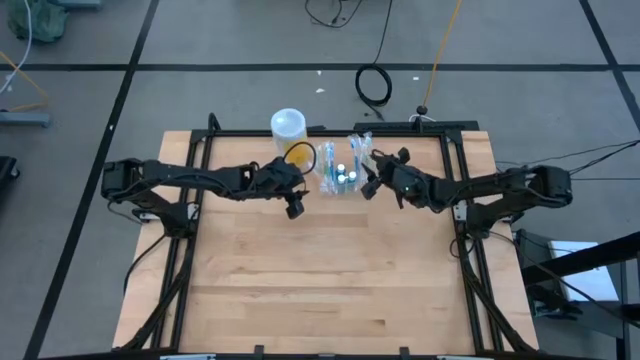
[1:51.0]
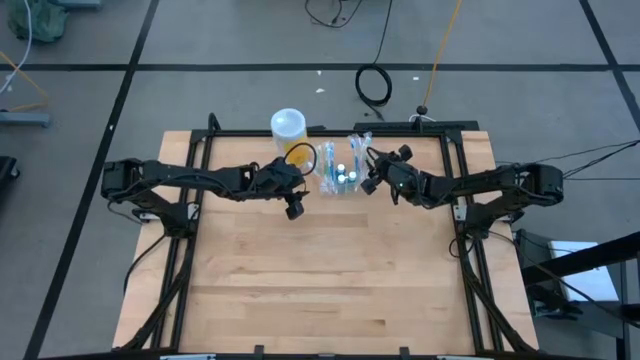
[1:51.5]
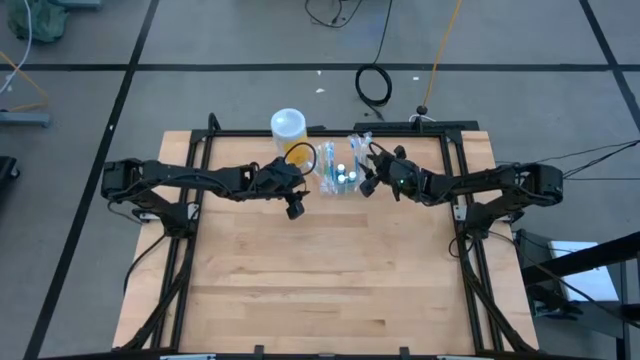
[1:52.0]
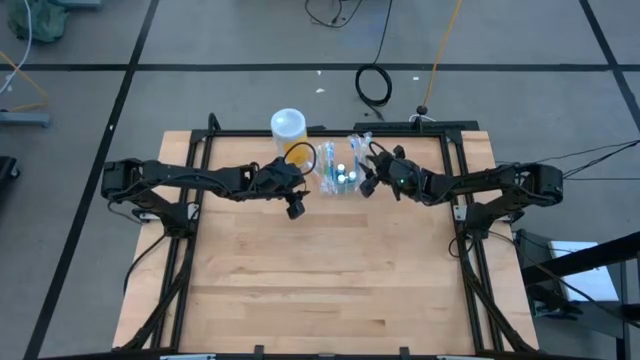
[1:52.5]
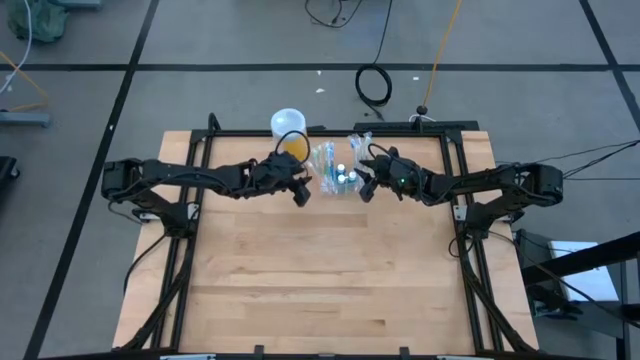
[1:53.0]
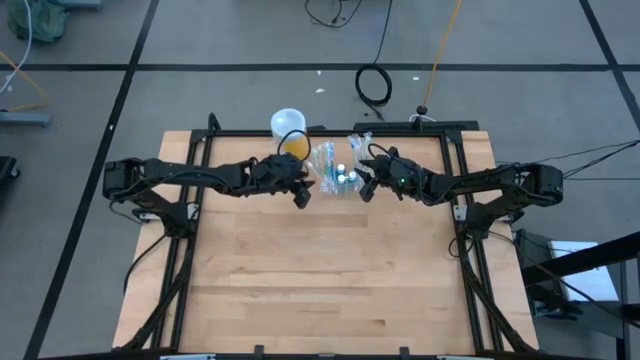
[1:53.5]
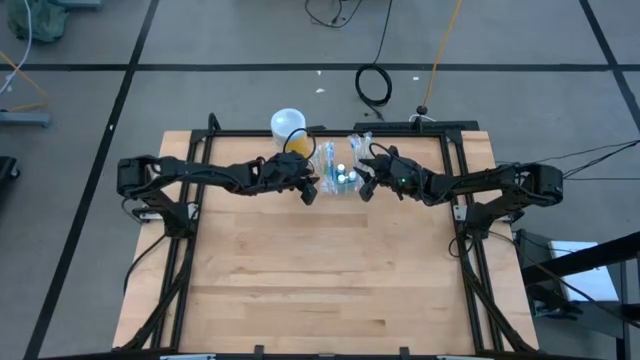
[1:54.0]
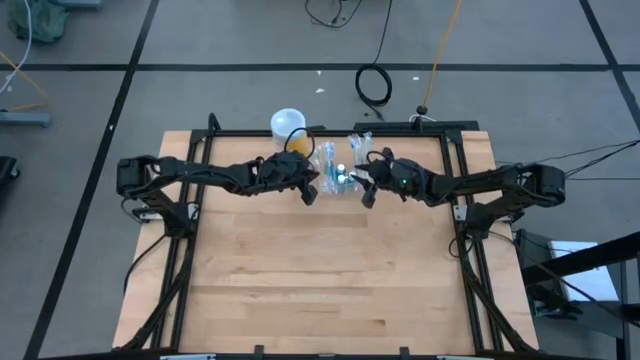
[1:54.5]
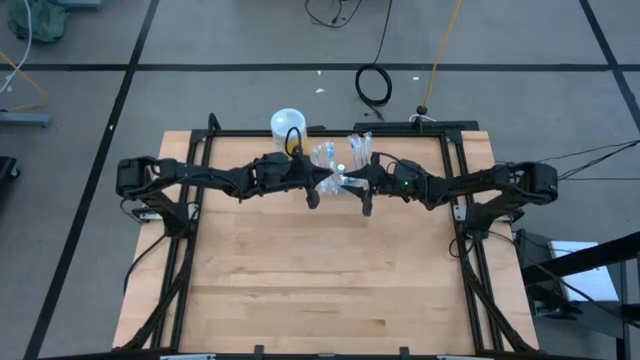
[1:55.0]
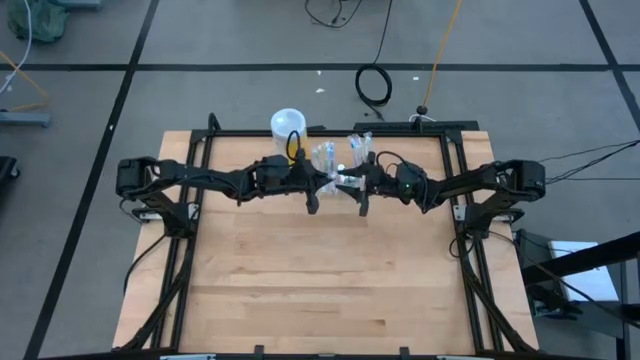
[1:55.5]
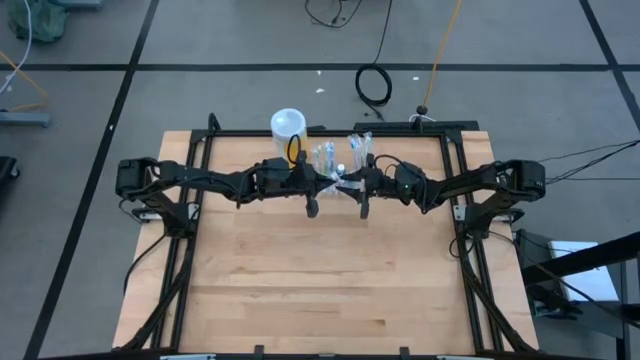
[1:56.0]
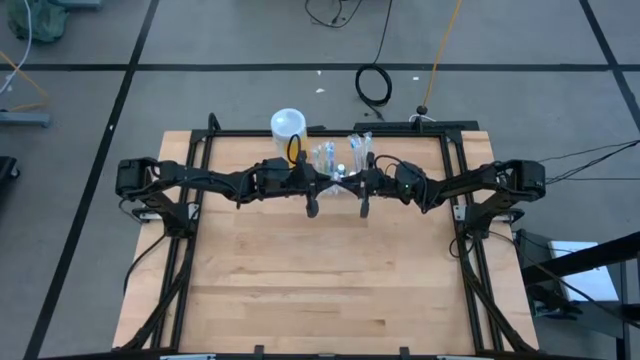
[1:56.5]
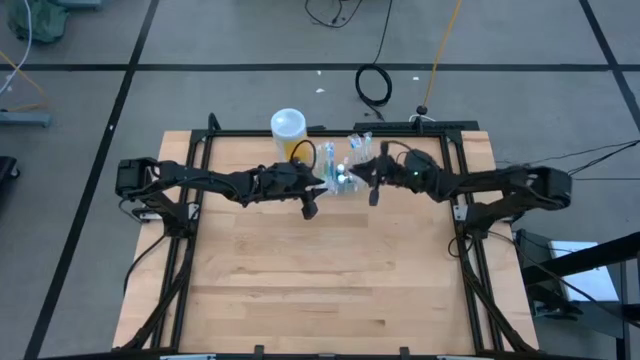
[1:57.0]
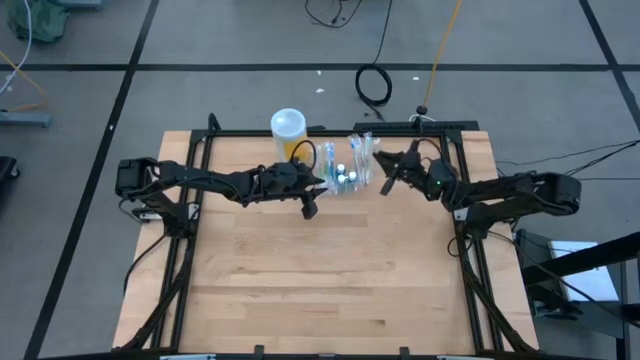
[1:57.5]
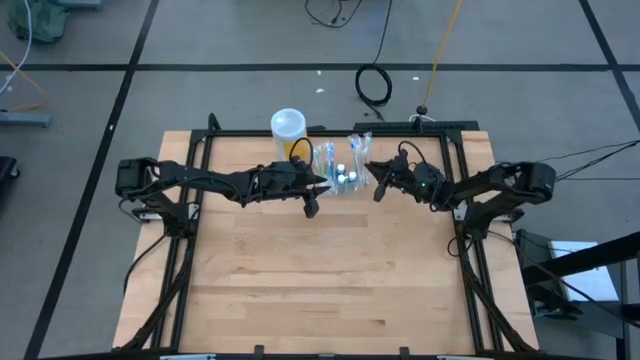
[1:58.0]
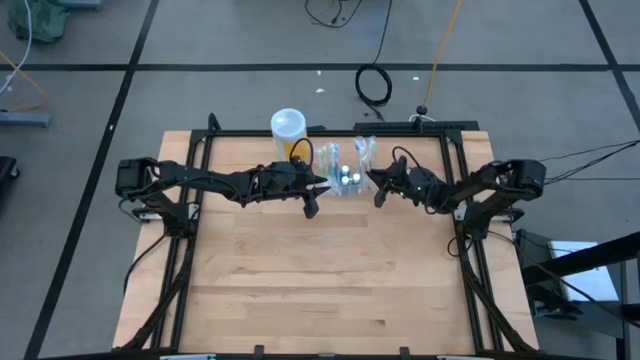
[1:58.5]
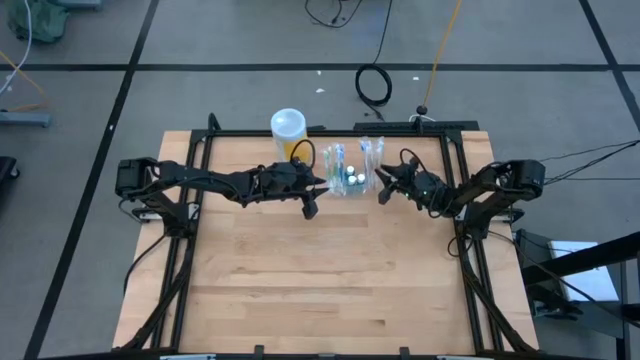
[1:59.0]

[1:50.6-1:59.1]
Task: Pick & Place toothbrushing station
Move the left side orange toothbrush to the right side of the transparent organizer

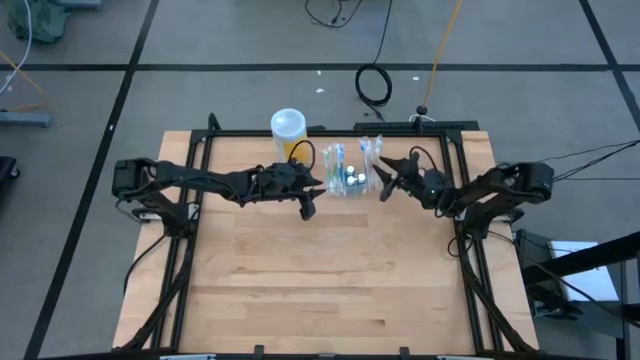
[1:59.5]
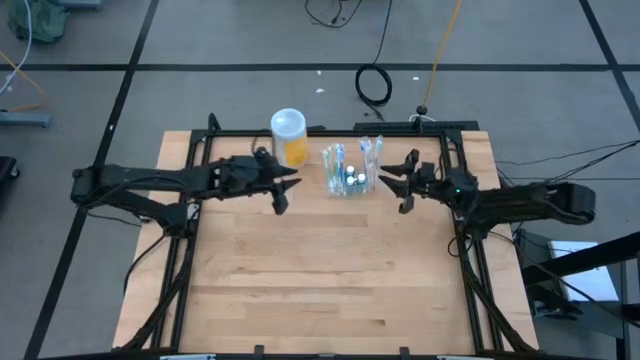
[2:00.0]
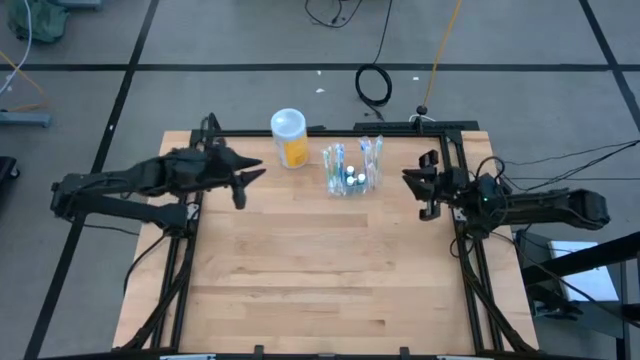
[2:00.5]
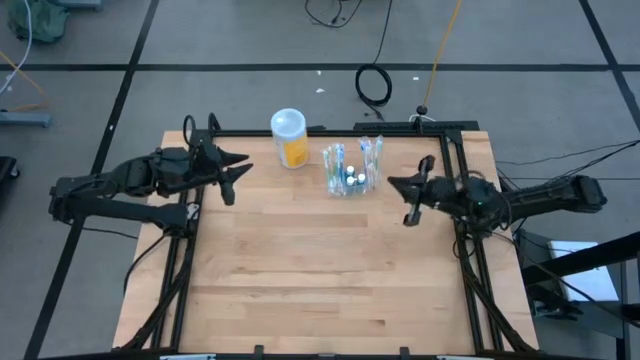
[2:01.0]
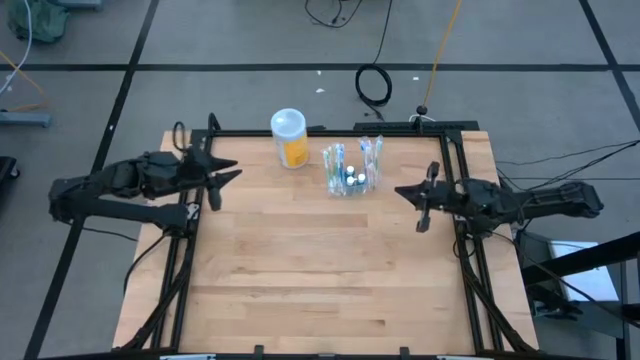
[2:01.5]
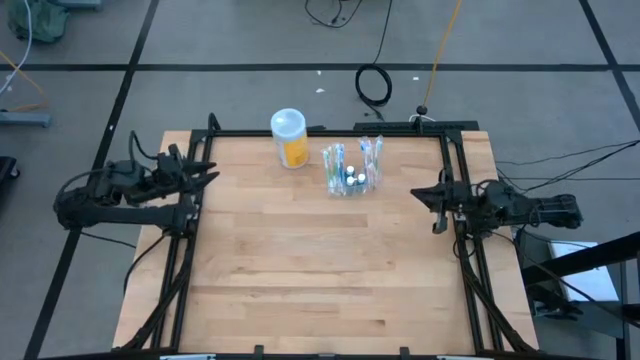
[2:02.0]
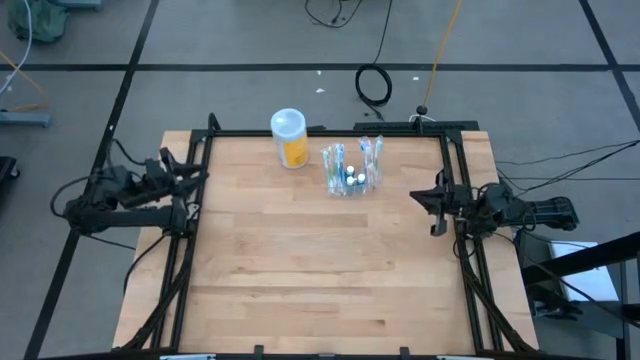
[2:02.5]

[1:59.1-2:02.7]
Return to home position

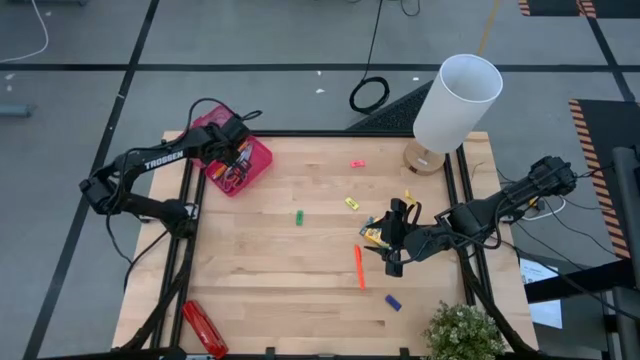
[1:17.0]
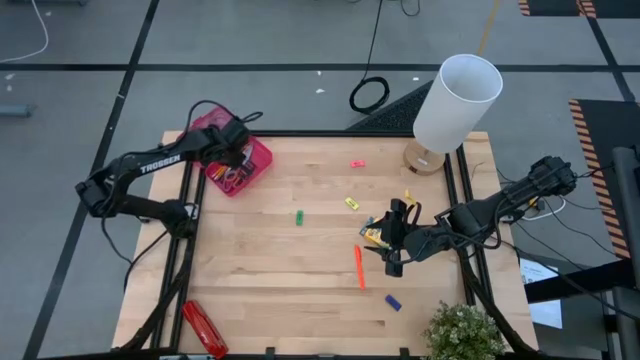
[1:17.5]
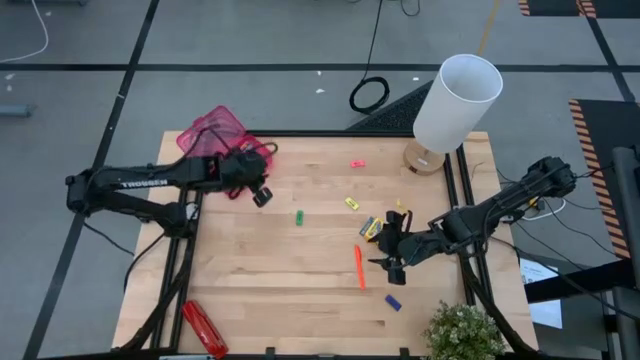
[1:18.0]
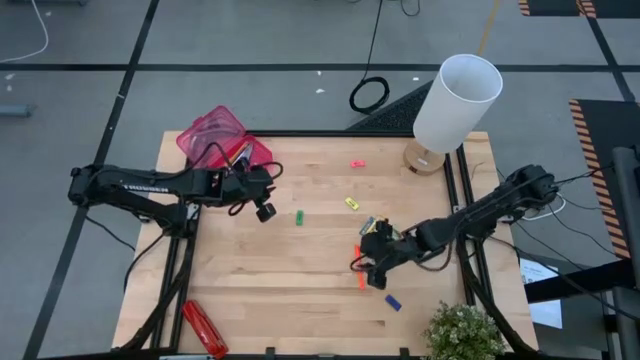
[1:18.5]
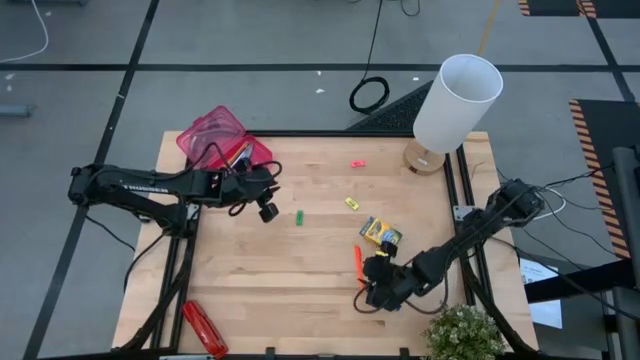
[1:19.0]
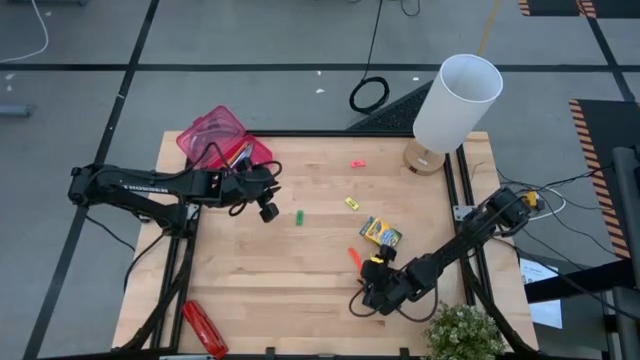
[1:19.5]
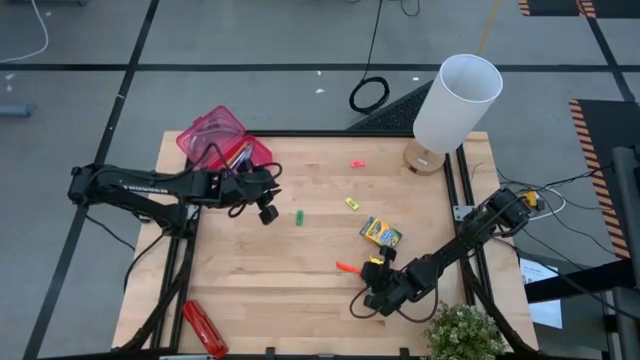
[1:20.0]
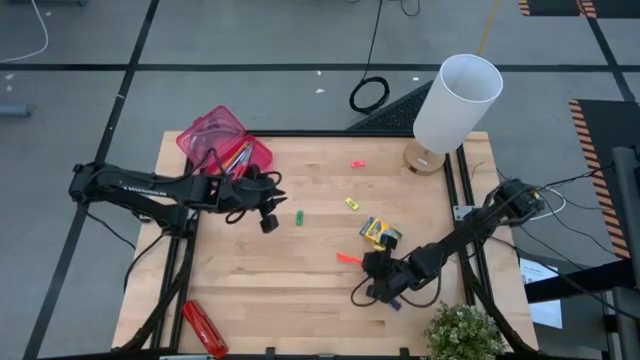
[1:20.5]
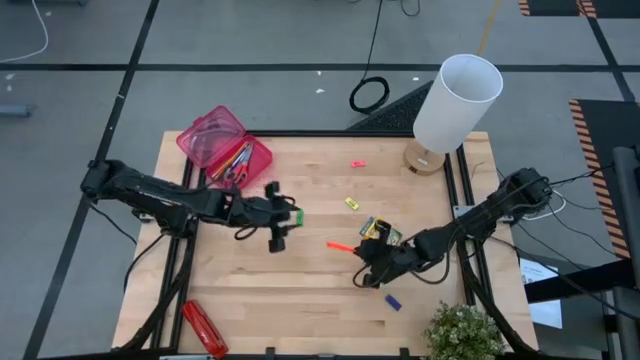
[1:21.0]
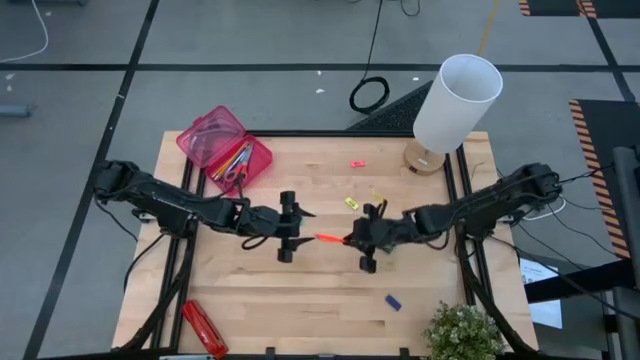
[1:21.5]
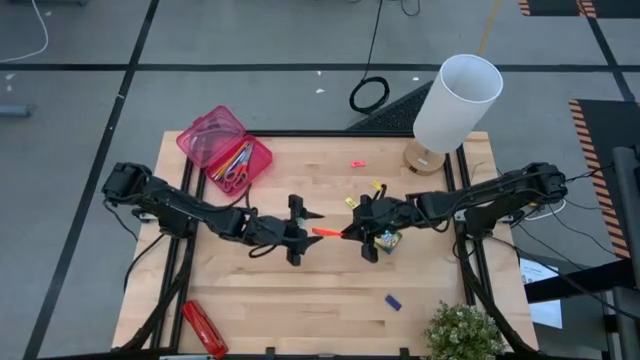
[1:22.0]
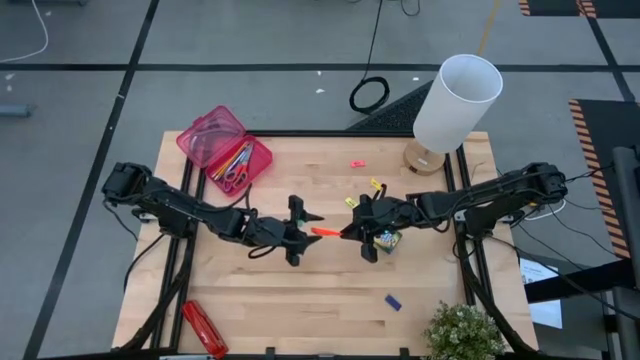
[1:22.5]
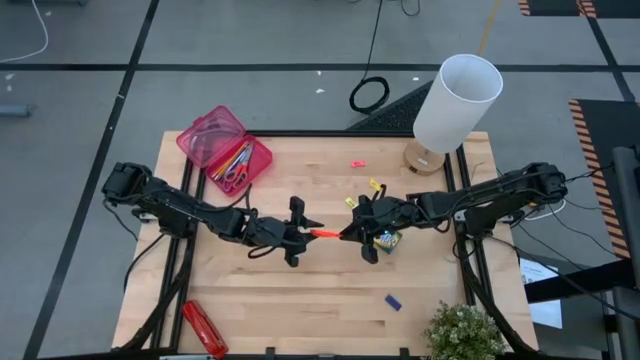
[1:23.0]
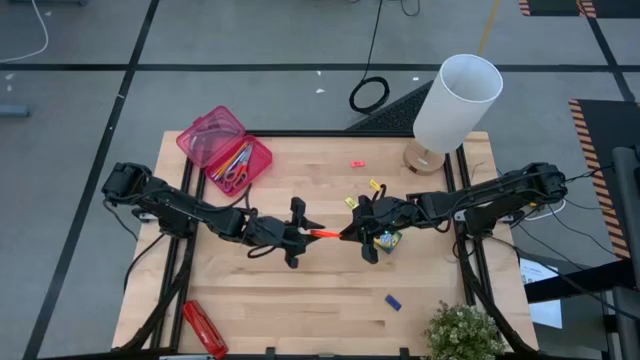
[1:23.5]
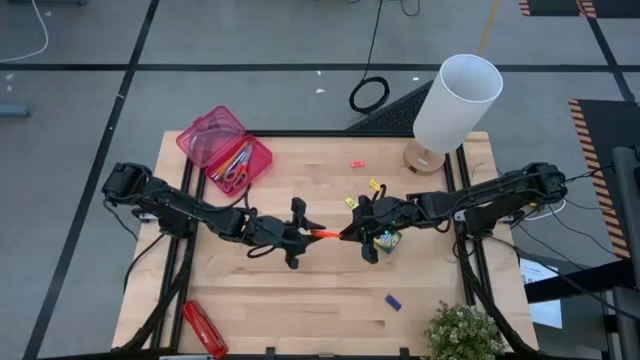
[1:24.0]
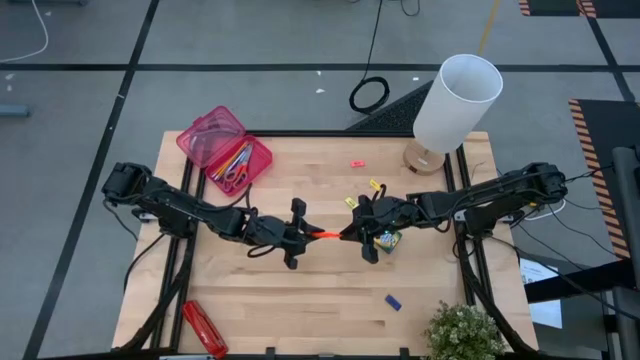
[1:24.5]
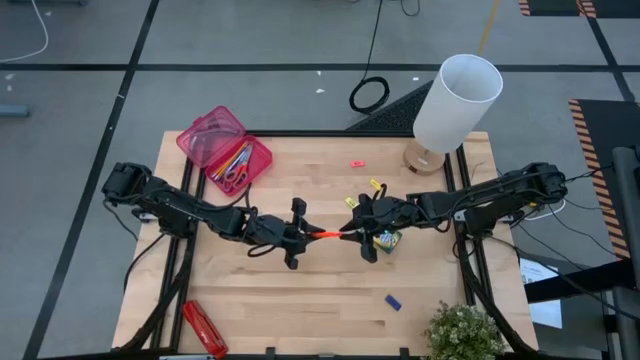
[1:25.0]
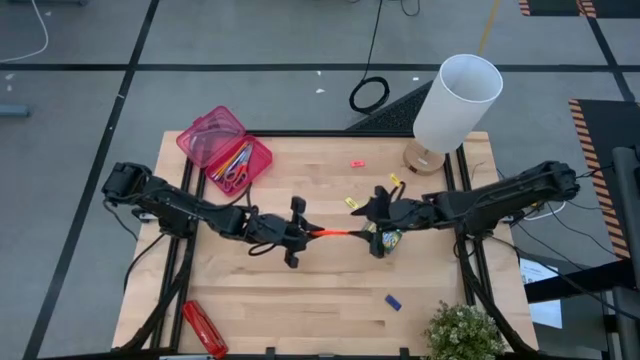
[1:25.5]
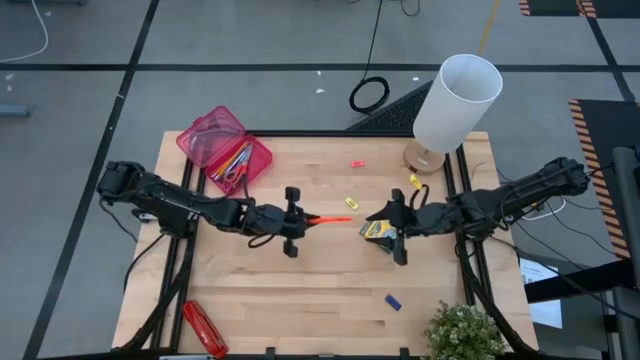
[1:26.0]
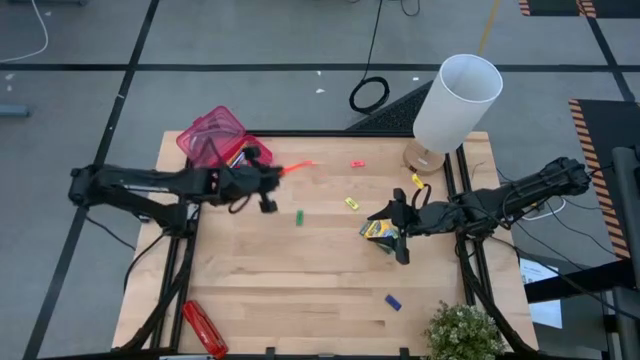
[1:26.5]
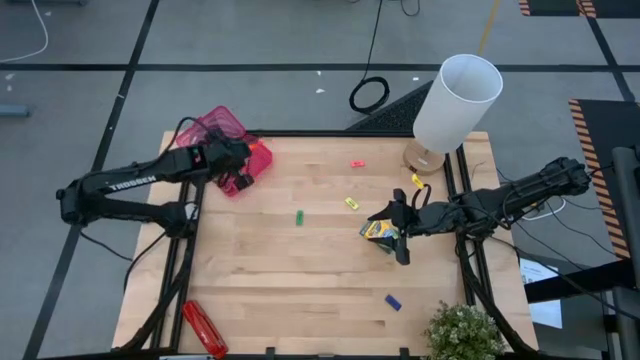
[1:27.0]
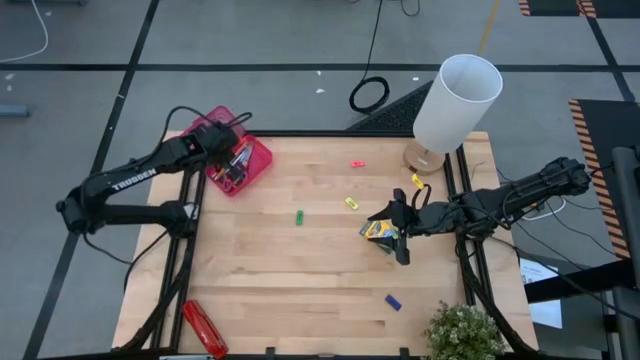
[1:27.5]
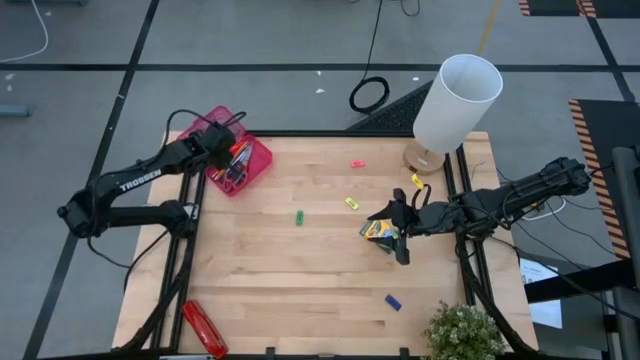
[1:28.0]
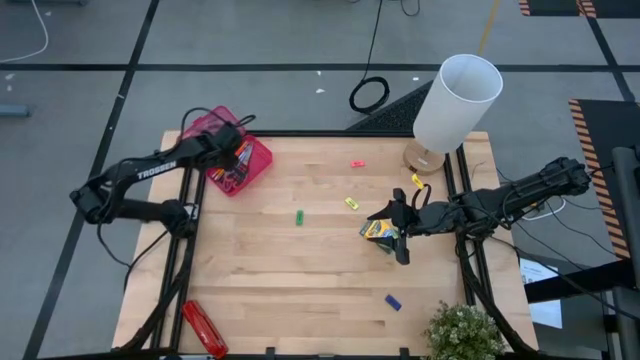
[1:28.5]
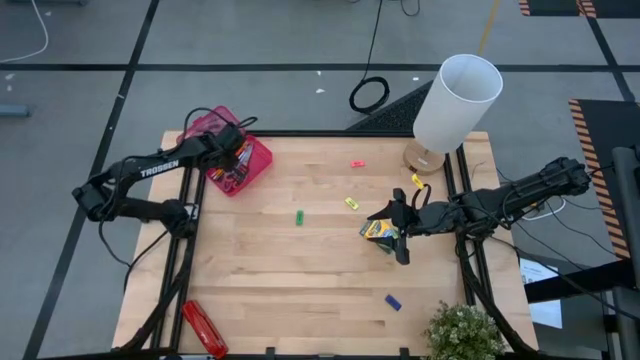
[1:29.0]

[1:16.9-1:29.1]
Task: Pack school essentials
Put the orange pen into the pink supply box
